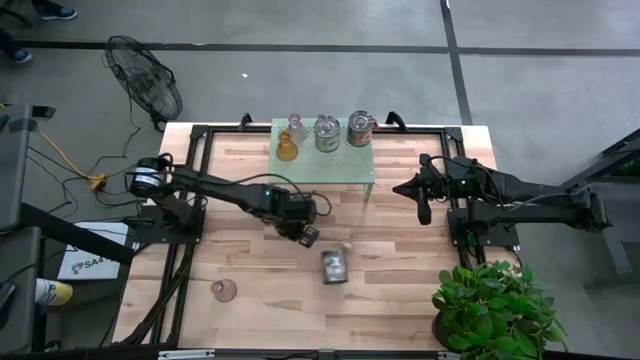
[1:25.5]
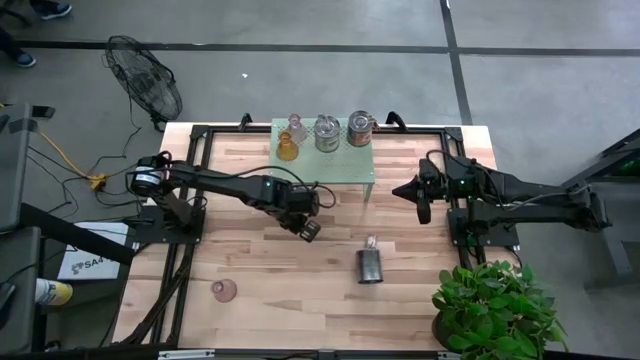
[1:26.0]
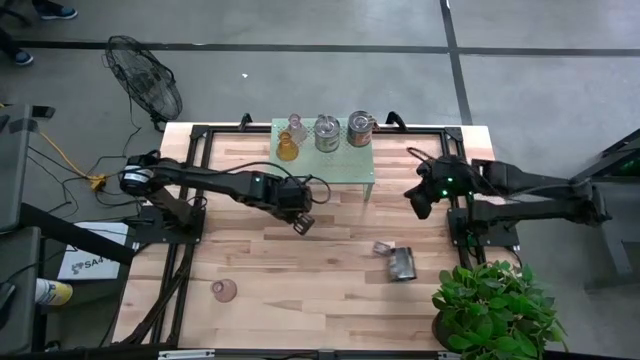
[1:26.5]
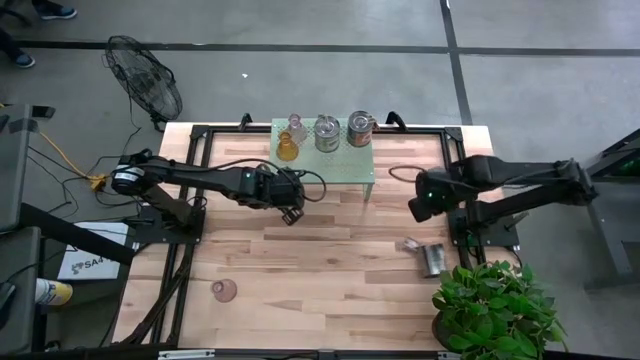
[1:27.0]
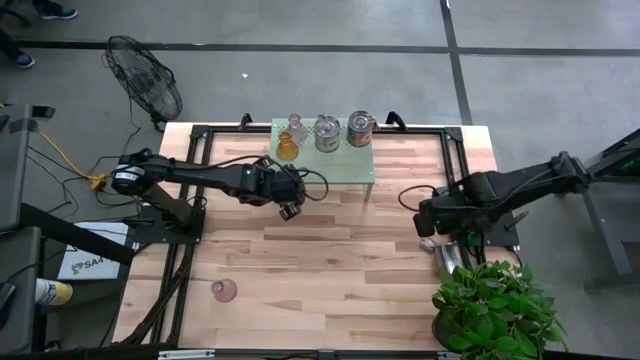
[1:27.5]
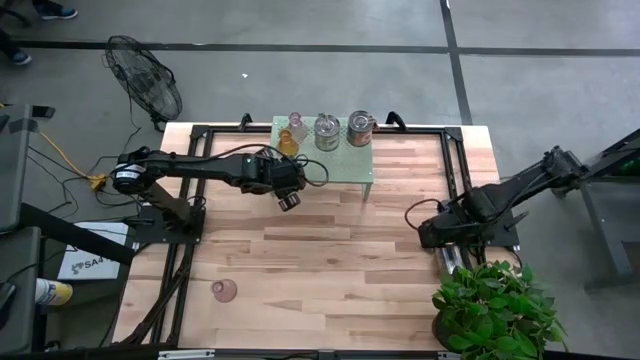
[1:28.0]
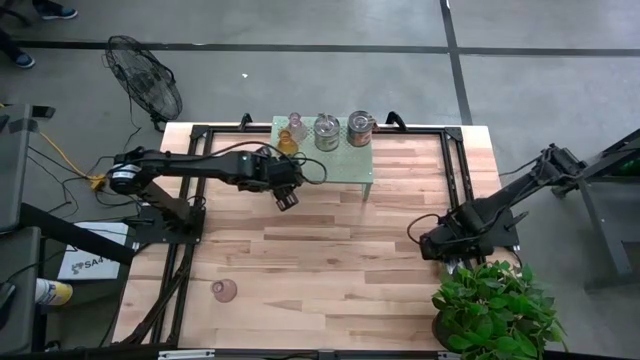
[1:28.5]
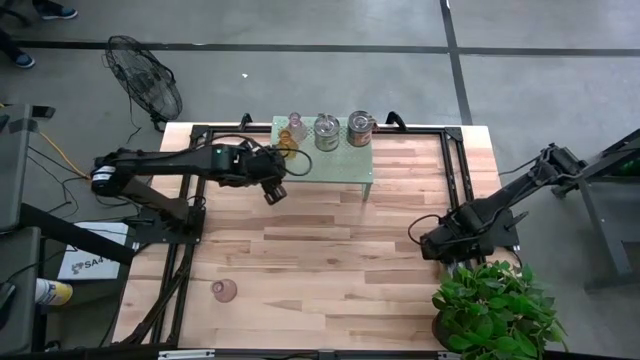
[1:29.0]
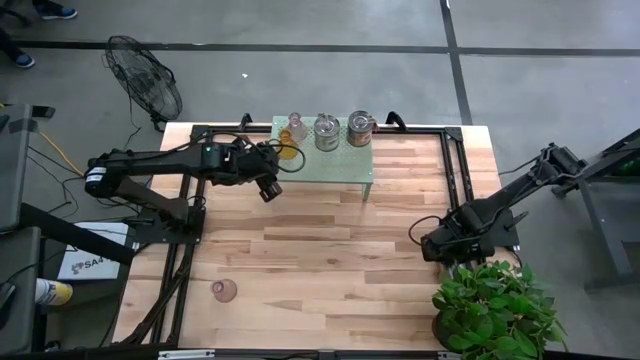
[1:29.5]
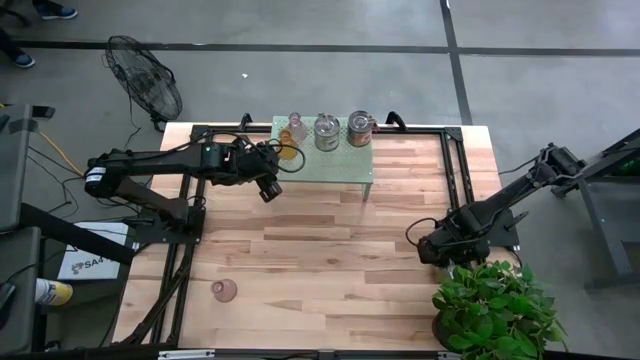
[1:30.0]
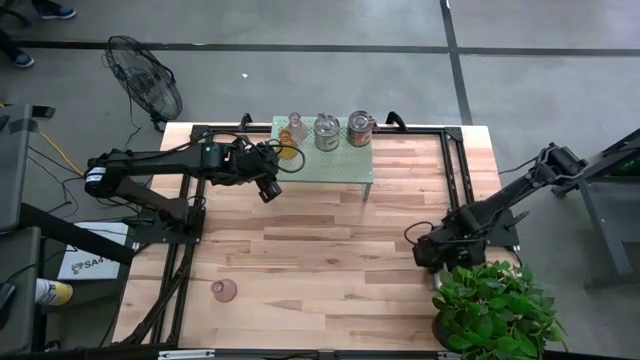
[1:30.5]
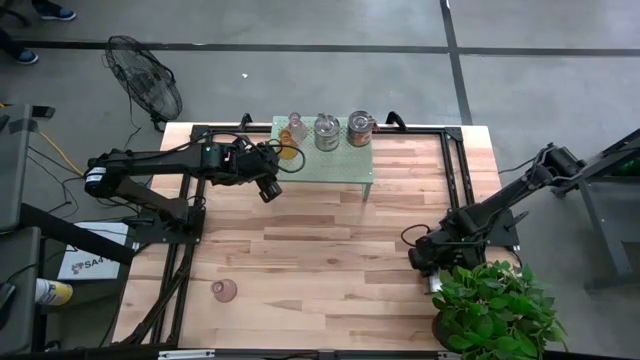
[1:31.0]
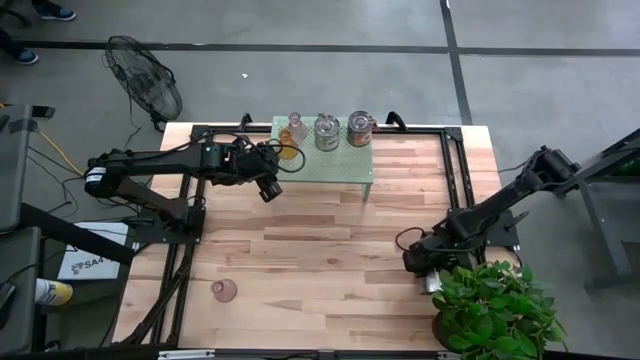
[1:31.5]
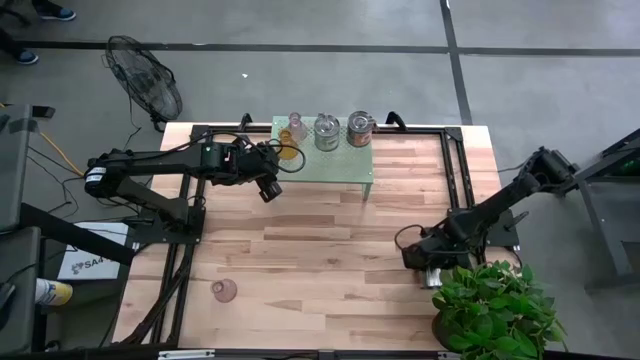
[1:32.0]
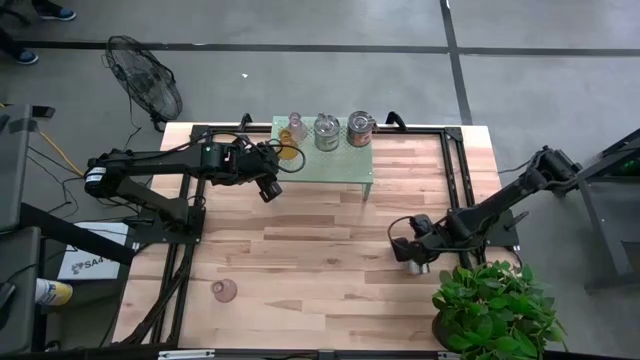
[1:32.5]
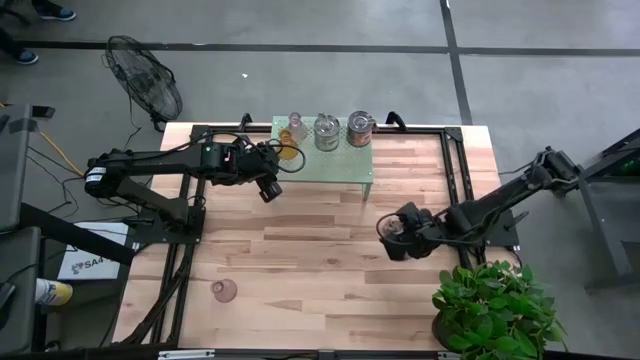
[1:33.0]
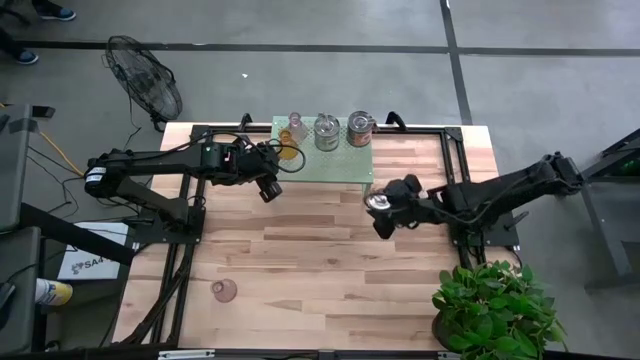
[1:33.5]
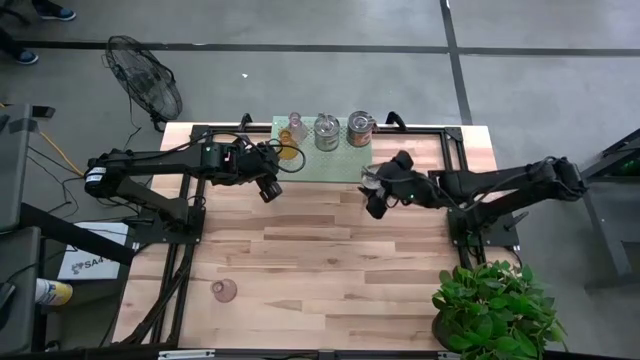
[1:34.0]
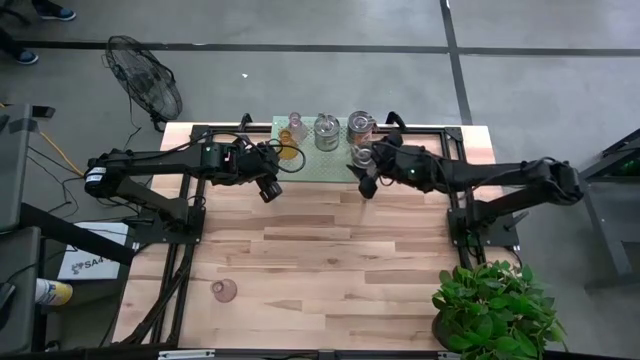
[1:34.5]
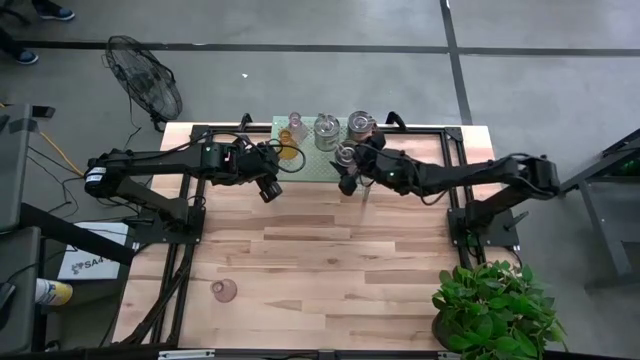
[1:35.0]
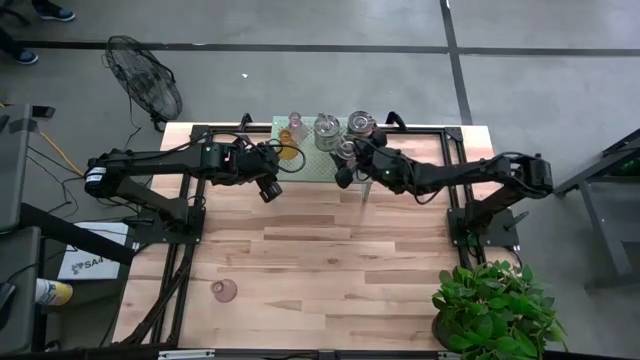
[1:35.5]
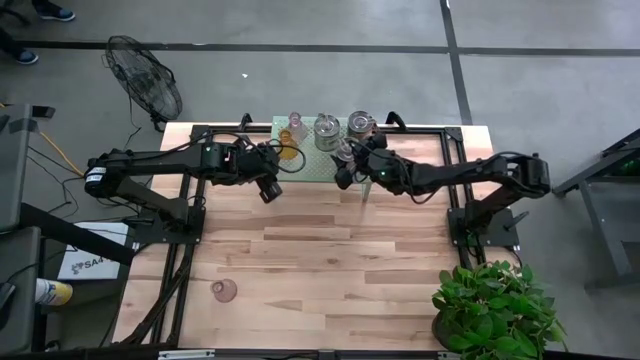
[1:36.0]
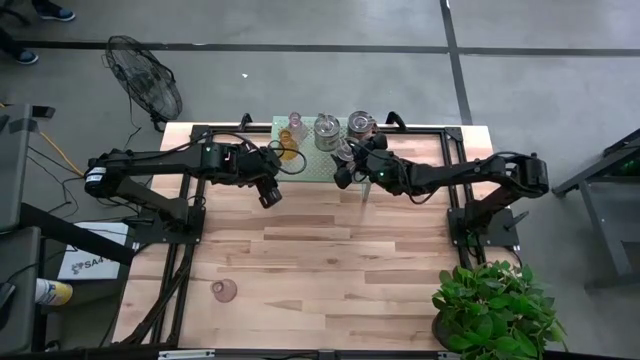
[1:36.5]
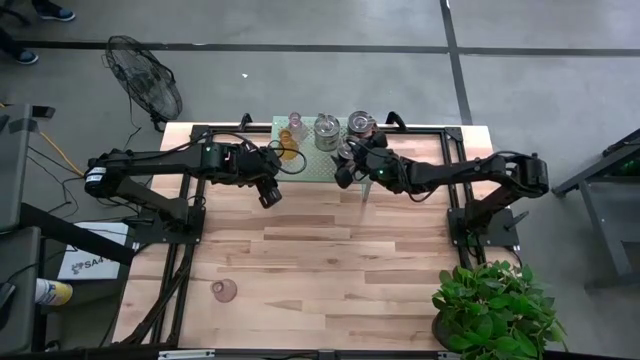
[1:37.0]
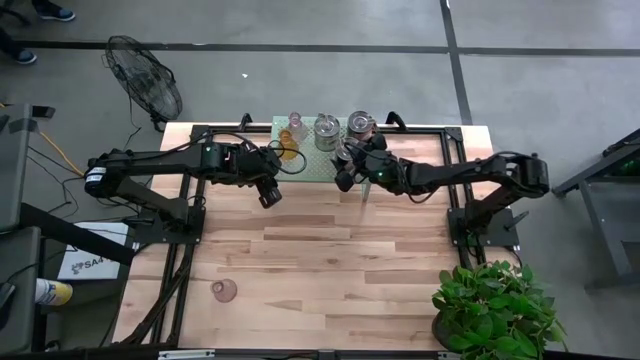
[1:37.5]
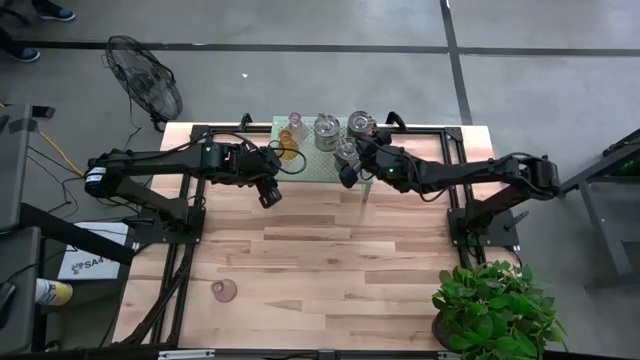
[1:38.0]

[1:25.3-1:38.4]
Task: Pick & Place candle stick holders
Put the silver scented candle on the shelf

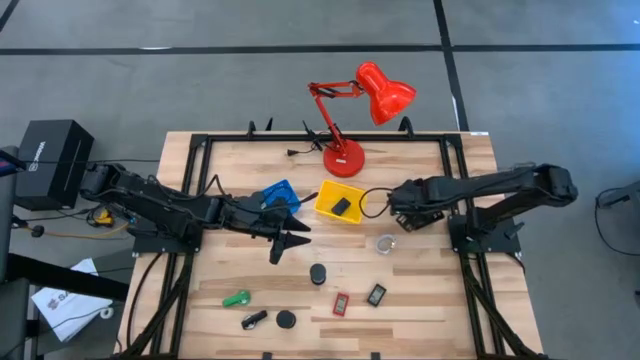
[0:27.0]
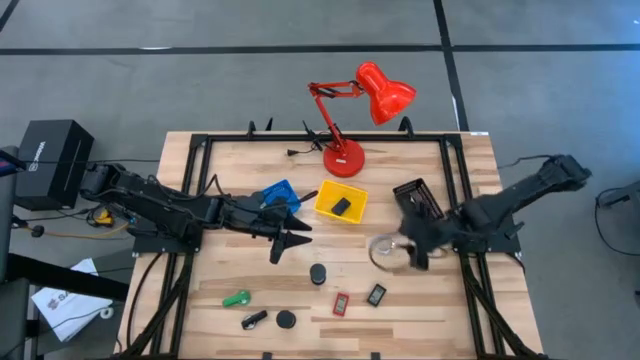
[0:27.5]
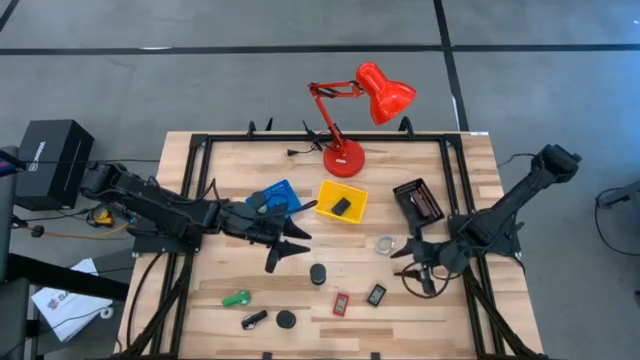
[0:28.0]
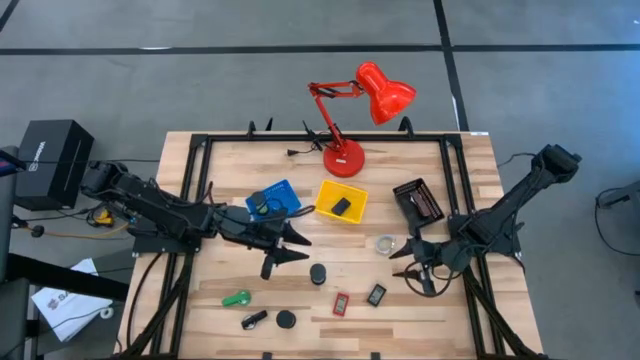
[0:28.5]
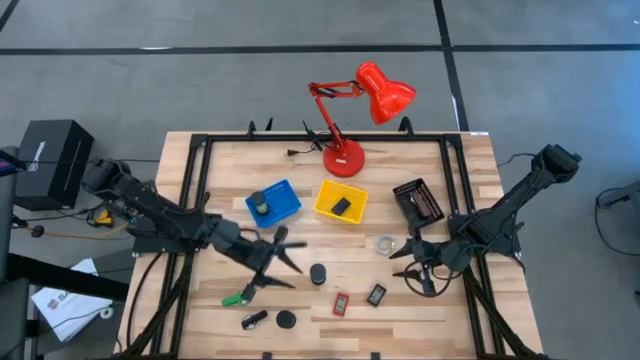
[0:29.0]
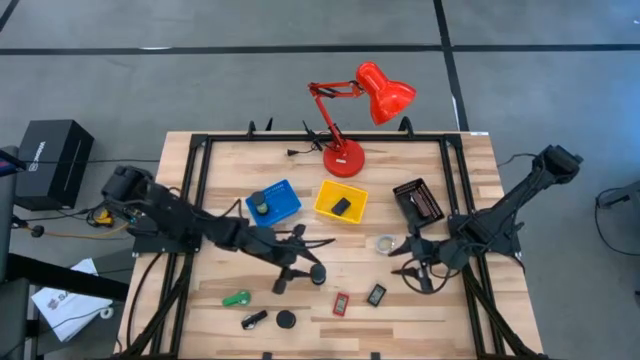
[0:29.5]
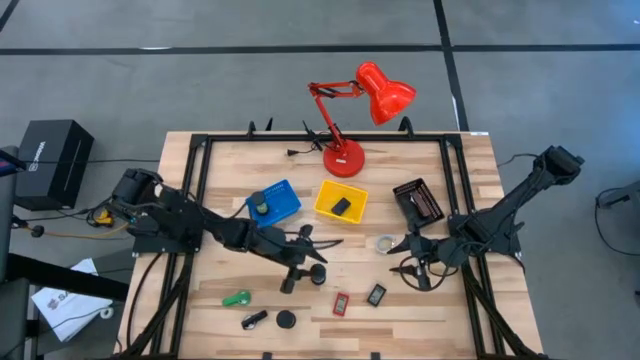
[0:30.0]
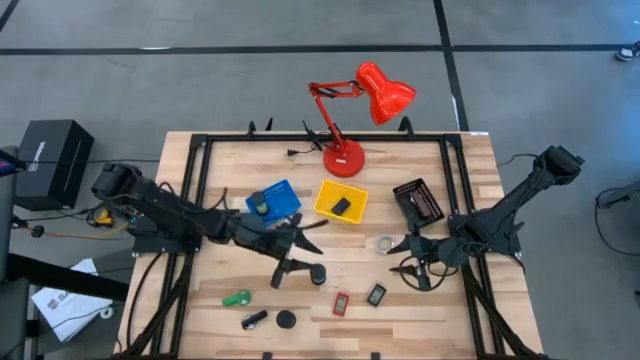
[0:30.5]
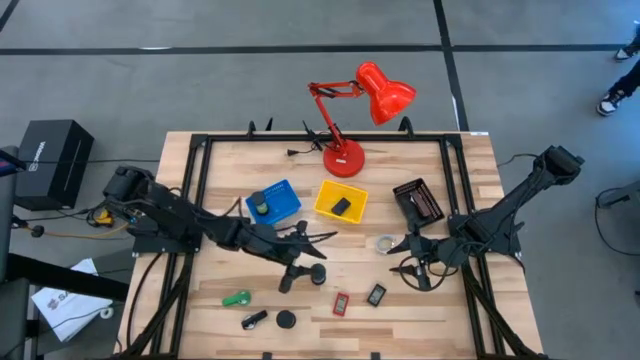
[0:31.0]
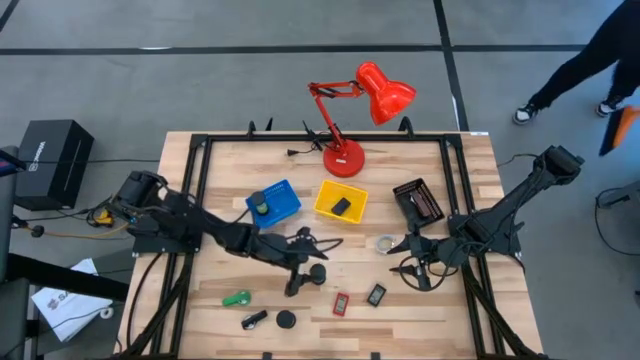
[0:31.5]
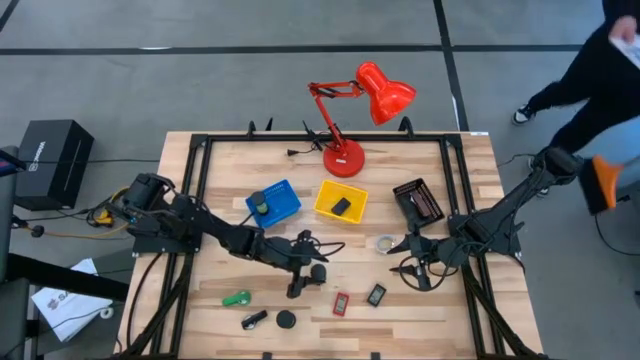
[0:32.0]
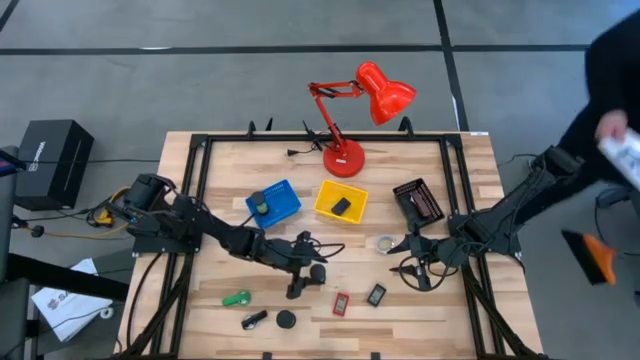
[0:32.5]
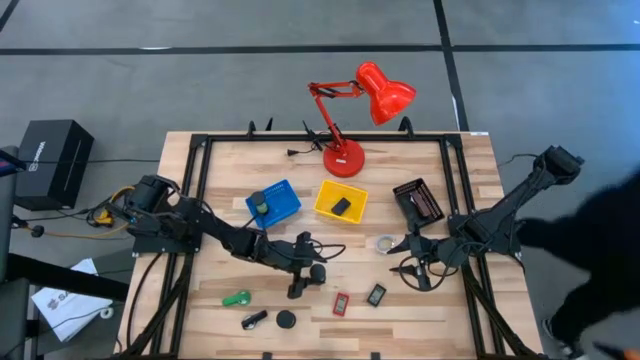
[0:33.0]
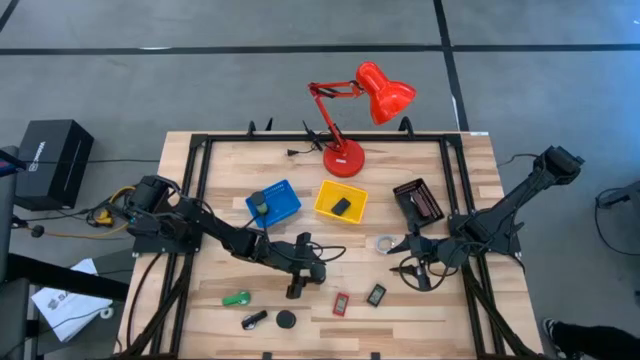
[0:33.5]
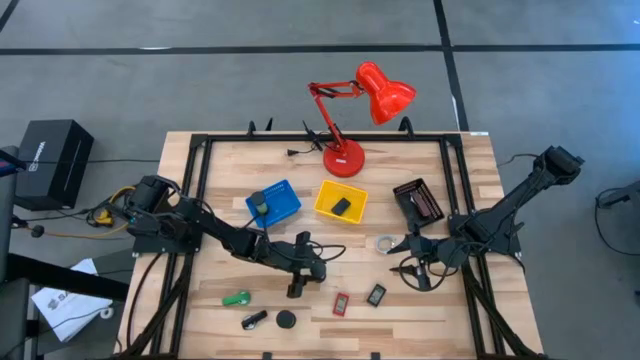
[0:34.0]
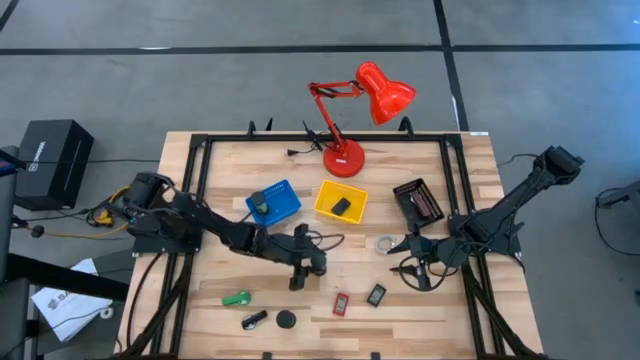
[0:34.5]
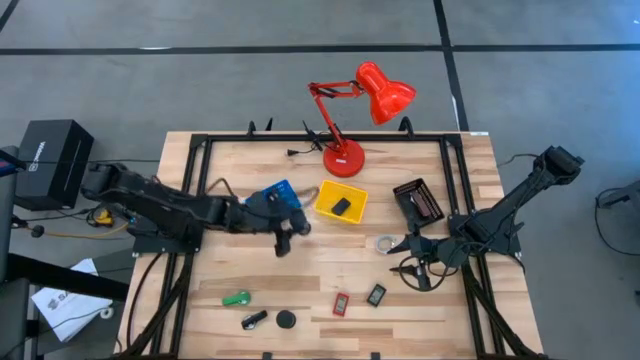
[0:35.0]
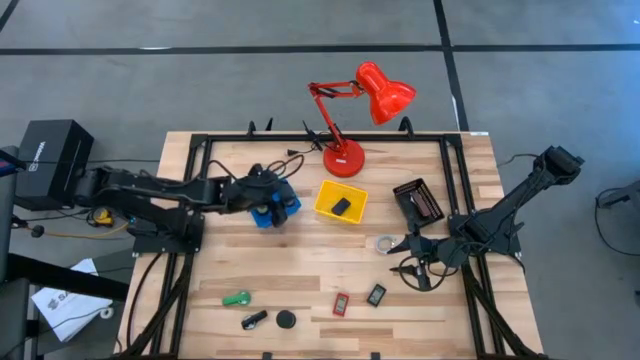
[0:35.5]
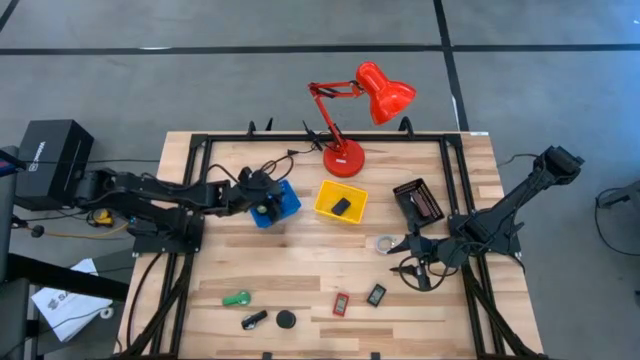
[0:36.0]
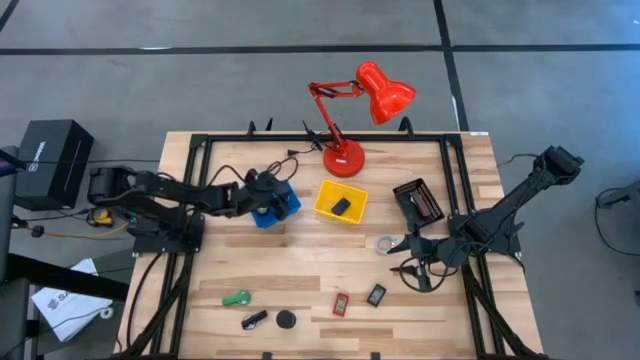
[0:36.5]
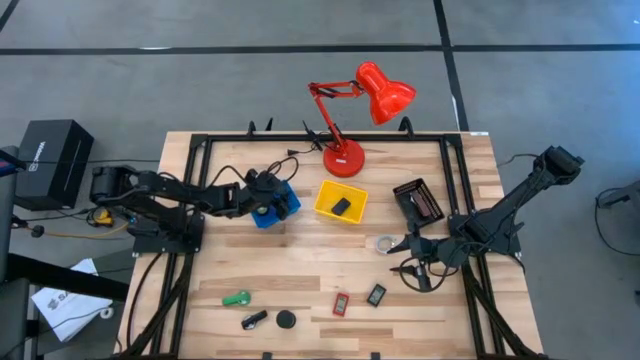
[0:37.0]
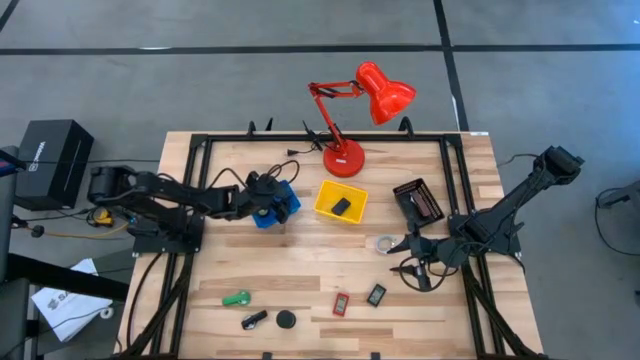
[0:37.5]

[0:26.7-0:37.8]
Task: Pick & Place Office items
Put the blue hourglass into the blue bin
